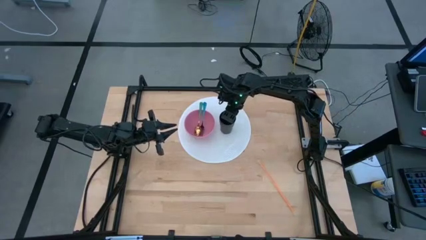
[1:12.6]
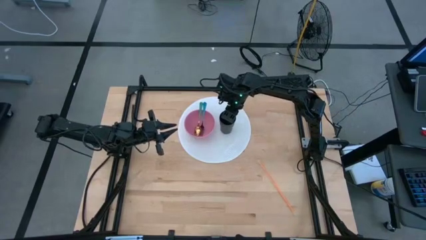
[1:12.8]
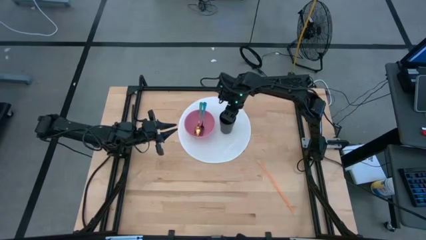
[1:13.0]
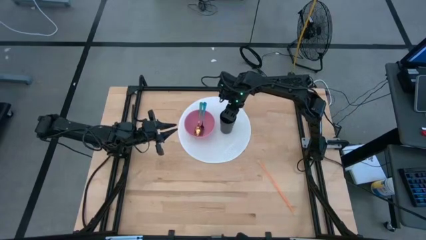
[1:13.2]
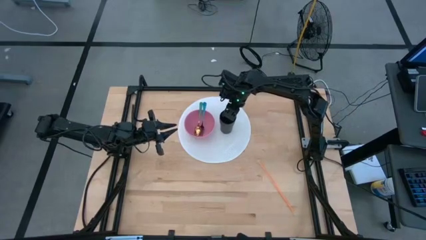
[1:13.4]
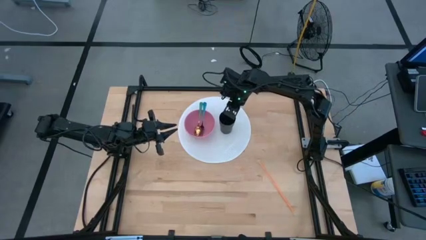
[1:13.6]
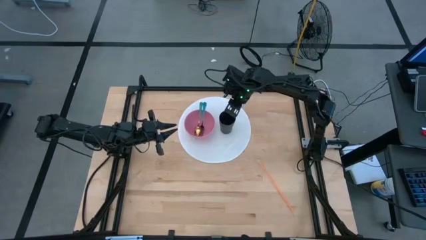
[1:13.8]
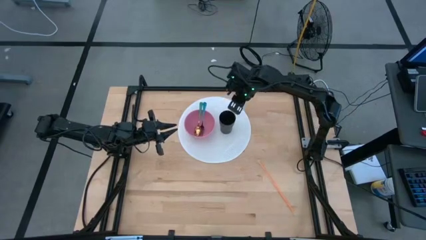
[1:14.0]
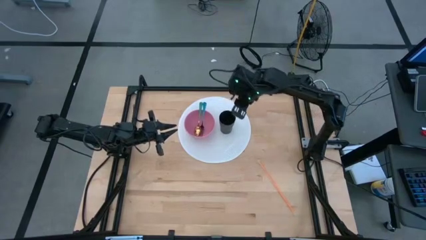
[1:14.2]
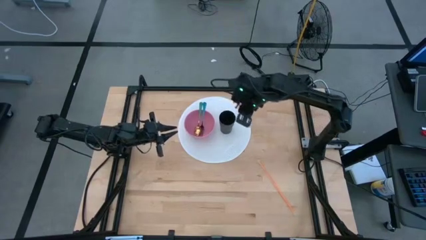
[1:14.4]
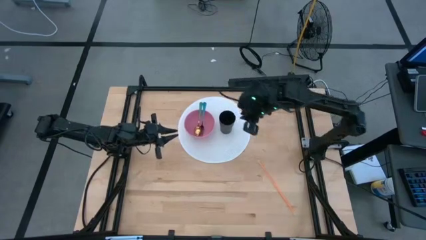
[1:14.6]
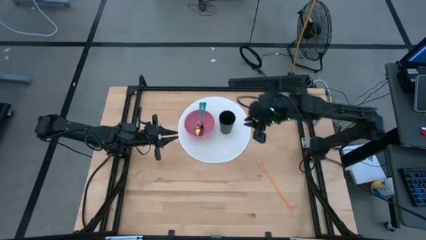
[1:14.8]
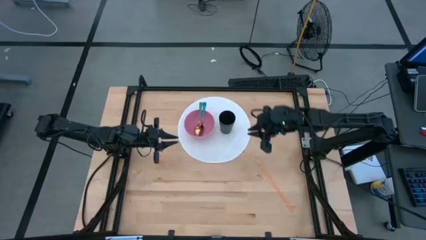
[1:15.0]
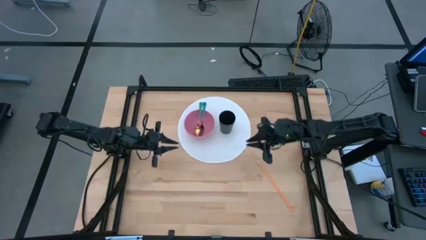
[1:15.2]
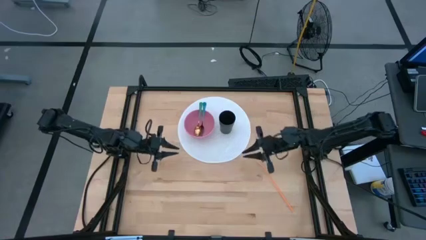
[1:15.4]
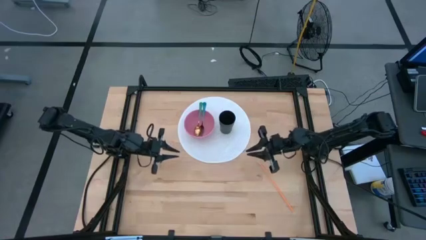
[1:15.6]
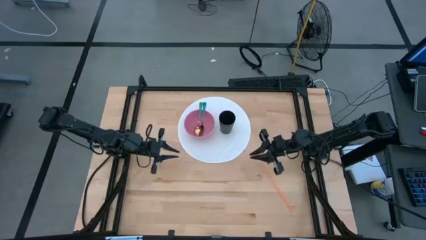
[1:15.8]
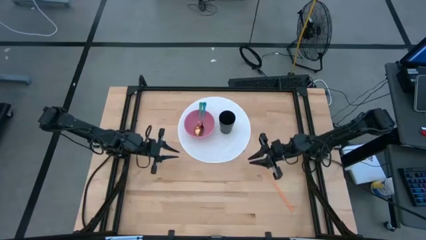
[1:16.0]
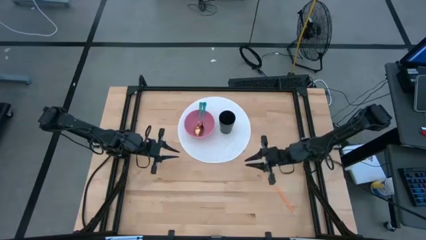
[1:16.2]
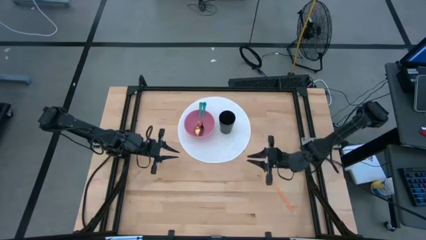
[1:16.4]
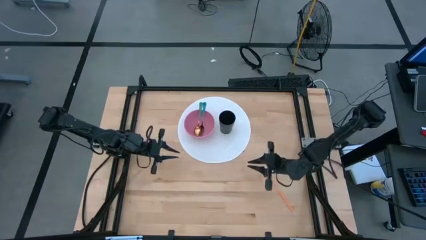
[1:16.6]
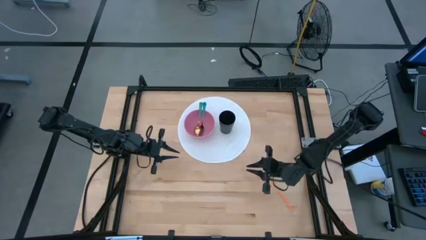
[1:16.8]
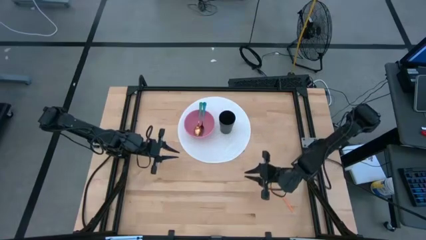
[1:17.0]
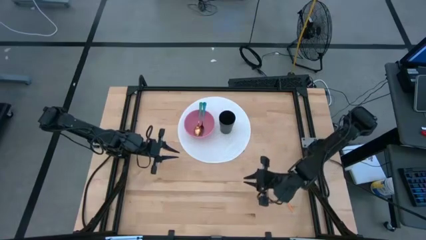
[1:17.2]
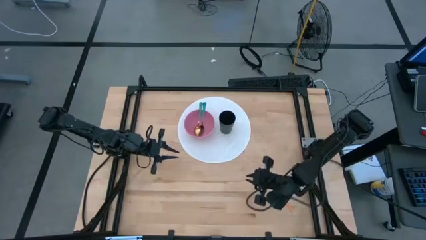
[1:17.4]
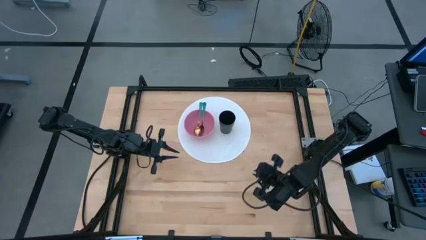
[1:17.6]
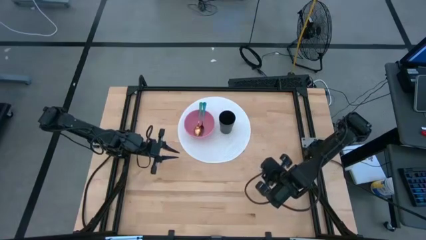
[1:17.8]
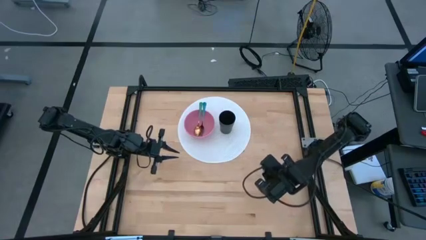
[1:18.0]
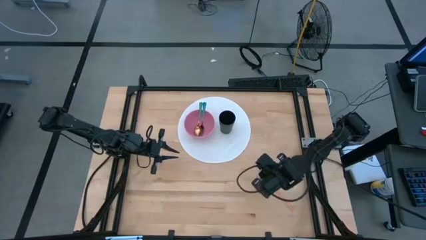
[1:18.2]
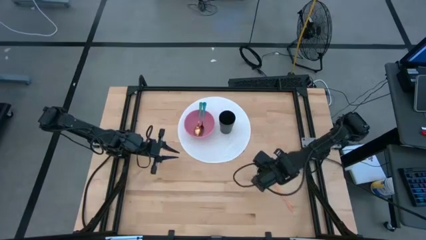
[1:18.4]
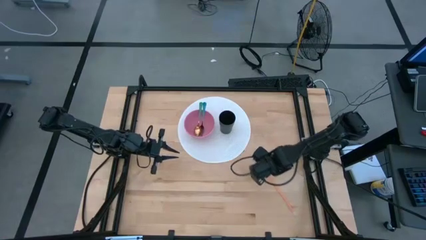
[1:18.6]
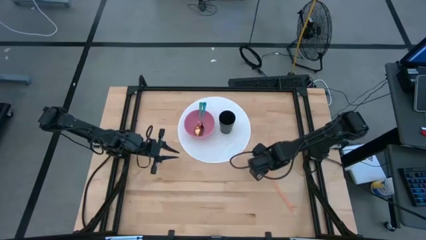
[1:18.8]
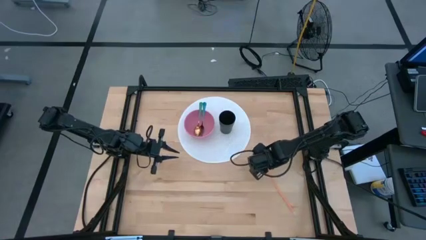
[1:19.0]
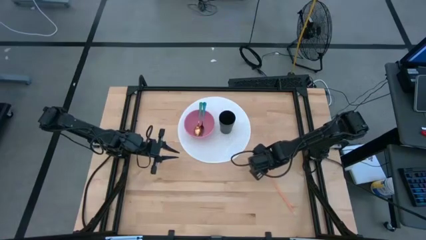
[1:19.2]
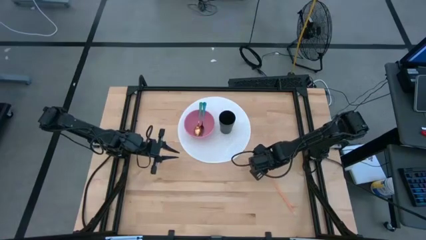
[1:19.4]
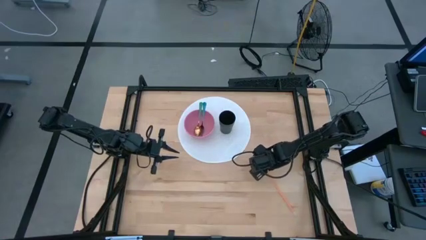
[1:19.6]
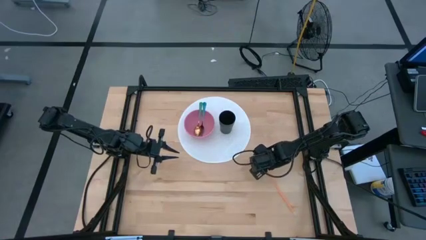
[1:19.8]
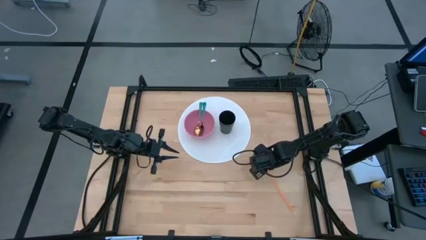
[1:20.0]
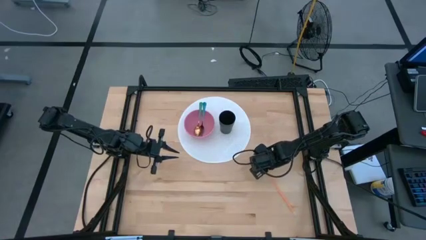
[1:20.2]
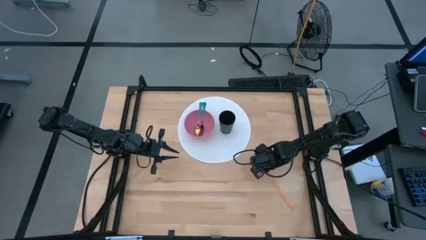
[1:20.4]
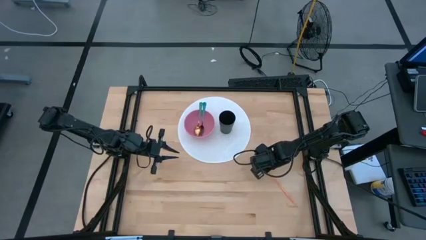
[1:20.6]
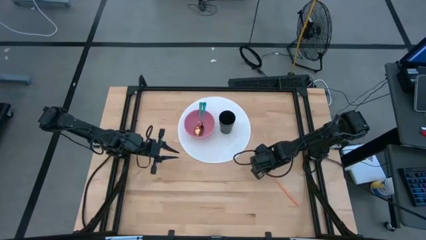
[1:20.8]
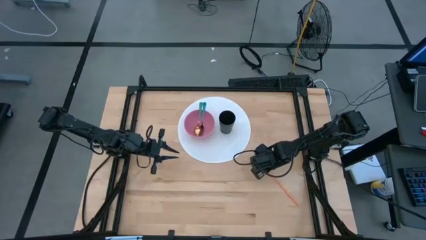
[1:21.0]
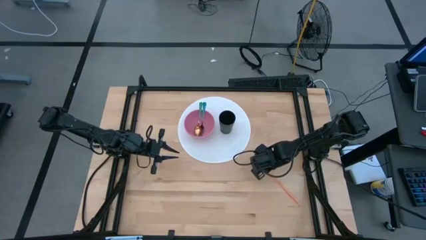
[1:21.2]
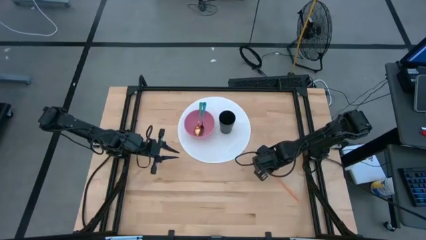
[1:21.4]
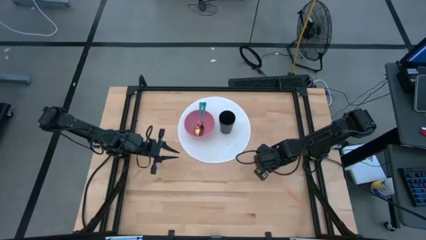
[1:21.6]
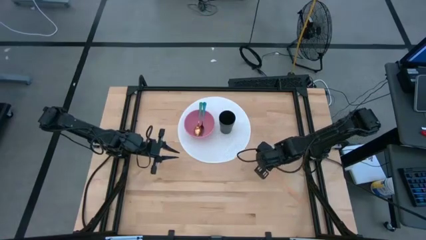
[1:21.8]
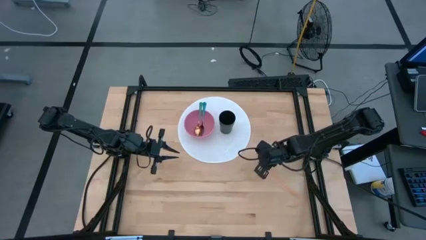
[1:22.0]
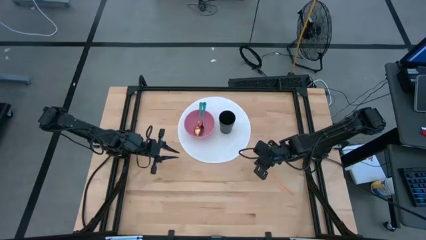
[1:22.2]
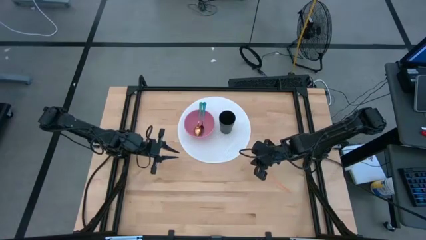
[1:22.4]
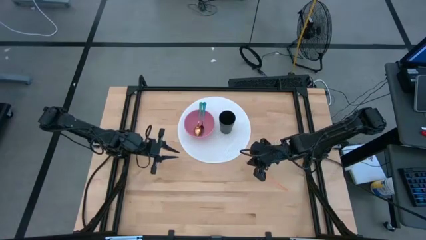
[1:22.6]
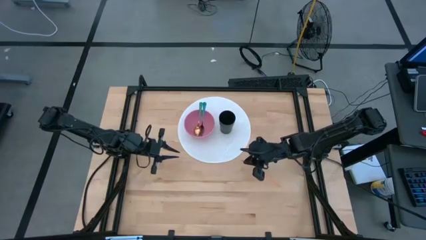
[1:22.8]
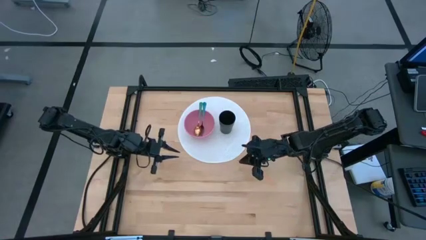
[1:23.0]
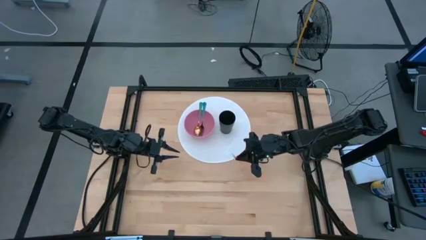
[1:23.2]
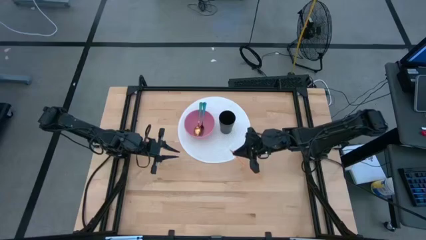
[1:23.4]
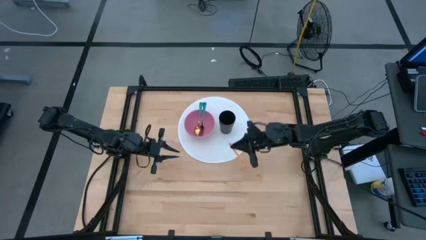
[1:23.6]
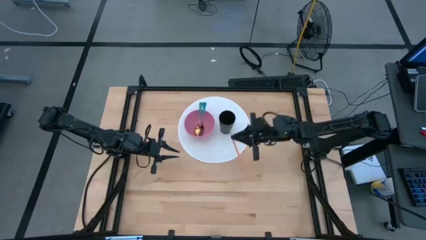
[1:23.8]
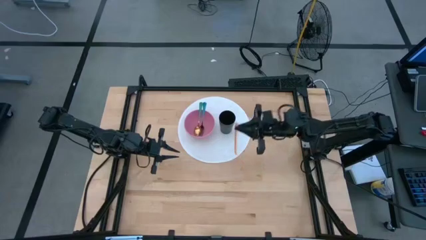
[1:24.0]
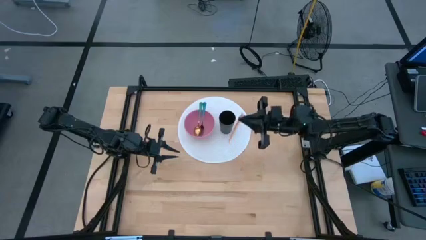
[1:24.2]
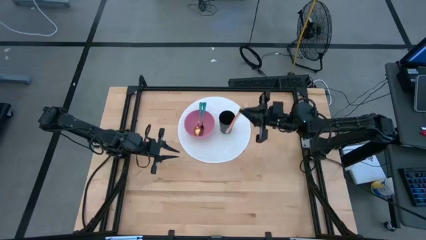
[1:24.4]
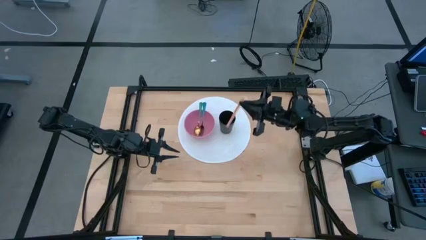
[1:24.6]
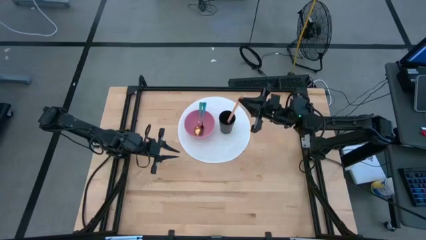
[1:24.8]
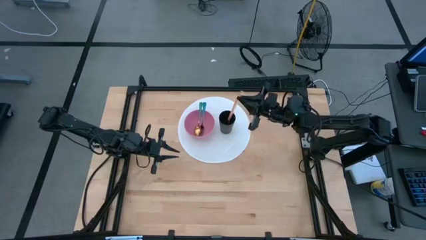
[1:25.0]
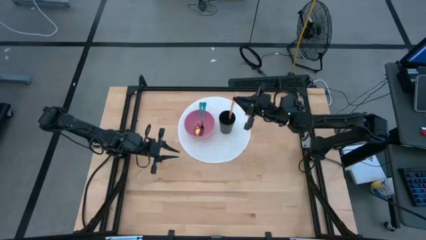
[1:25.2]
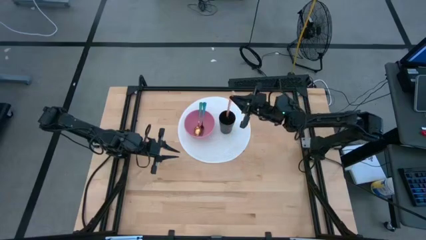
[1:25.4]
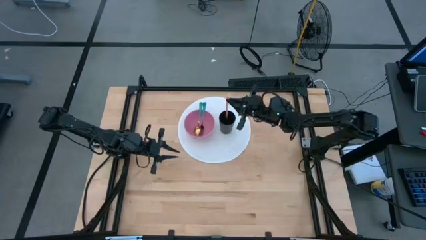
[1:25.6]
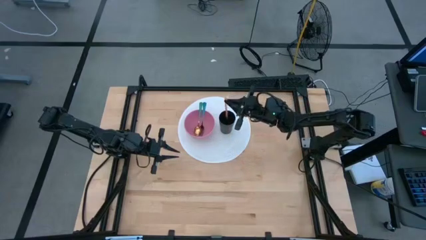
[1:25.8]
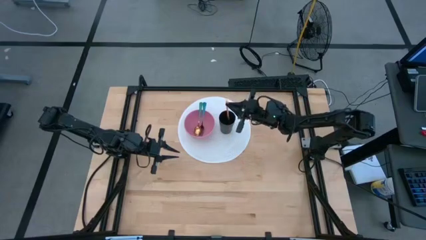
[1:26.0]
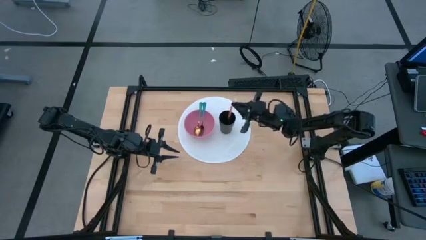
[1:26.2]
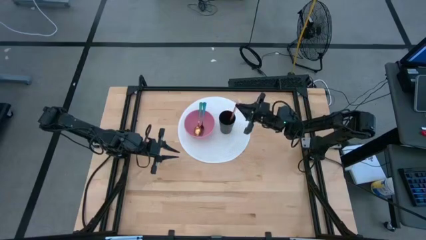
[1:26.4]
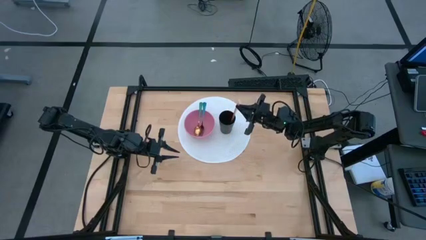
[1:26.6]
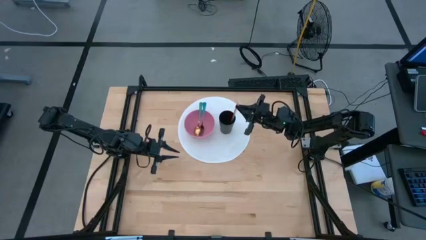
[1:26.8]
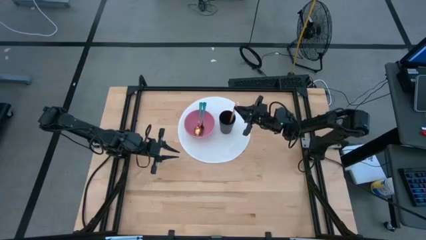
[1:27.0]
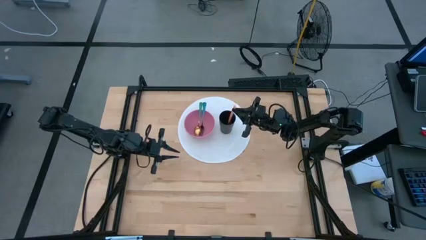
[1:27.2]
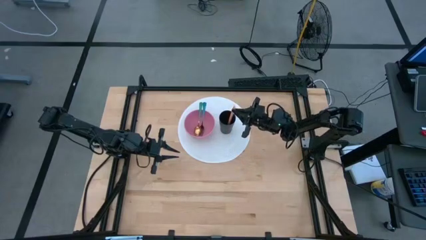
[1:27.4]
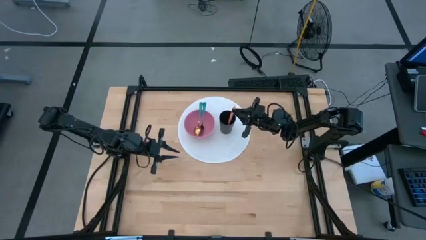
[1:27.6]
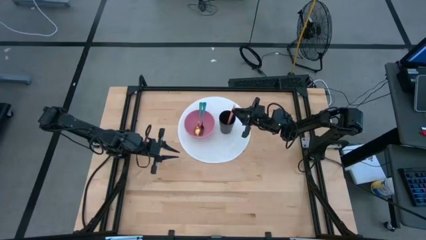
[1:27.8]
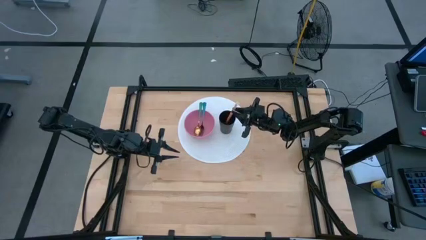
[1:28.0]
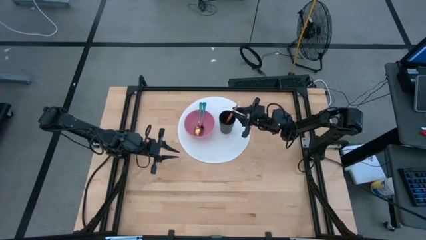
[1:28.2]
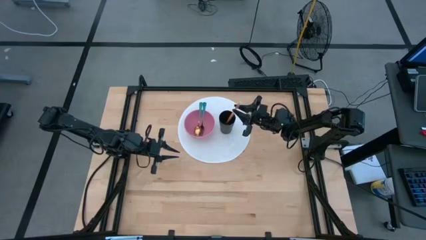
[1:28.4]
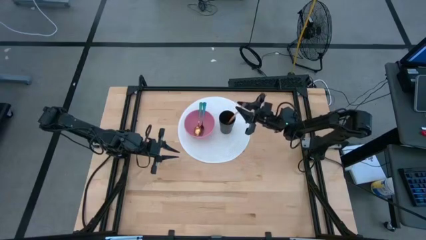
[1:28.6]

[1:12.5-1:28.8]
Task: Pick & Place Utensil
Put the orange straw into the black cup
